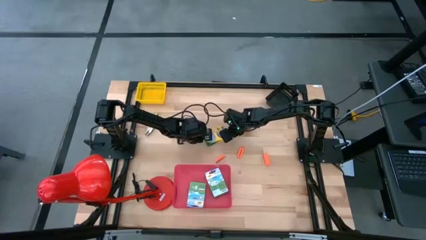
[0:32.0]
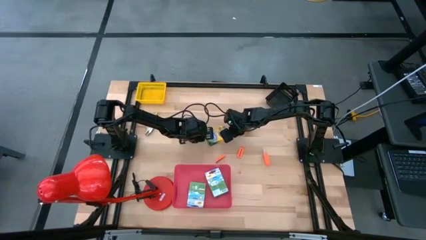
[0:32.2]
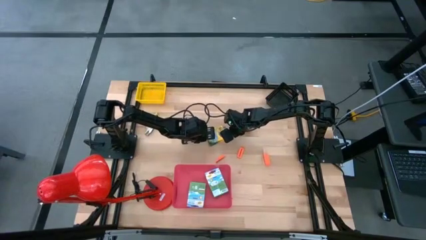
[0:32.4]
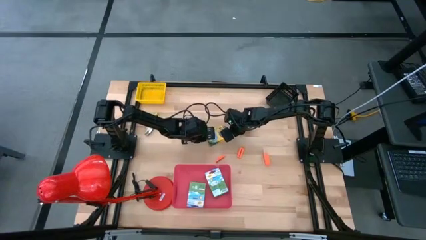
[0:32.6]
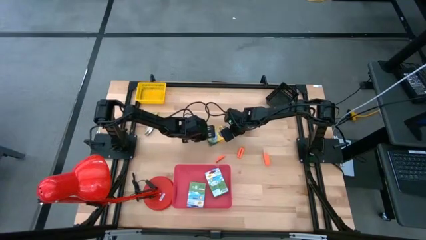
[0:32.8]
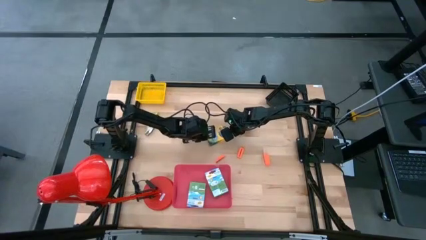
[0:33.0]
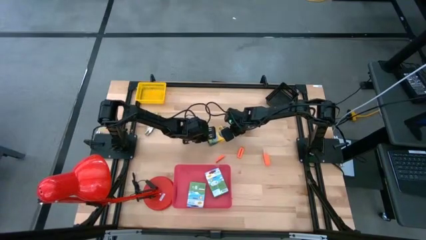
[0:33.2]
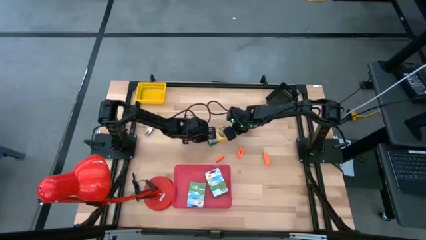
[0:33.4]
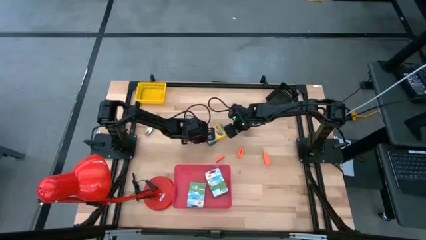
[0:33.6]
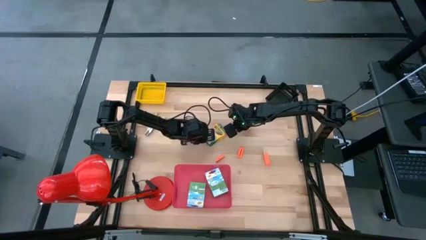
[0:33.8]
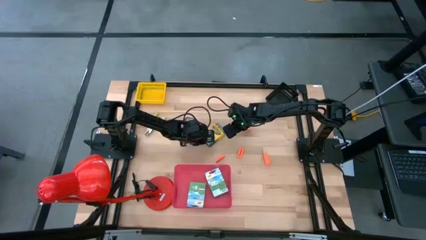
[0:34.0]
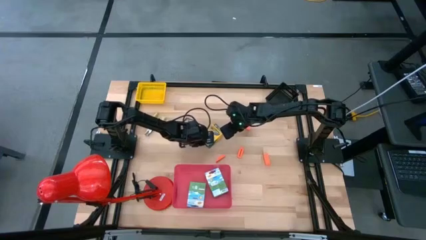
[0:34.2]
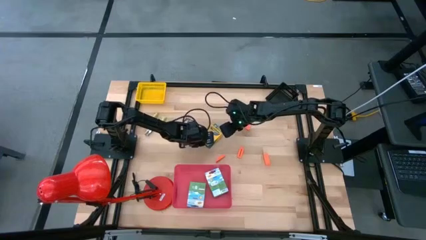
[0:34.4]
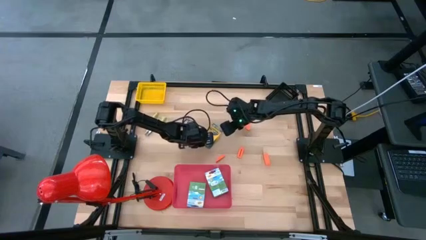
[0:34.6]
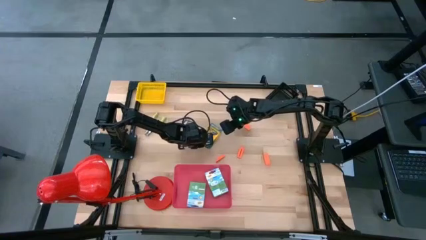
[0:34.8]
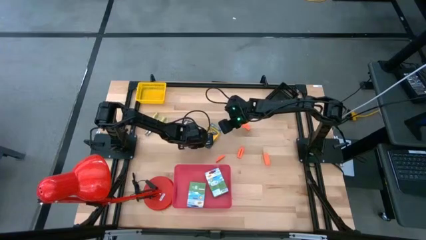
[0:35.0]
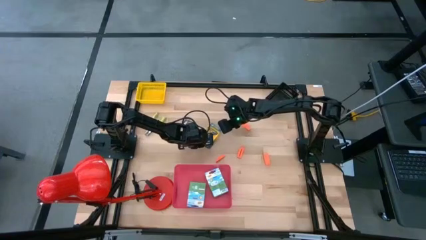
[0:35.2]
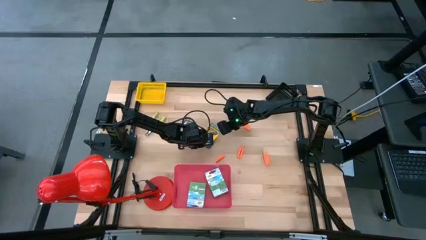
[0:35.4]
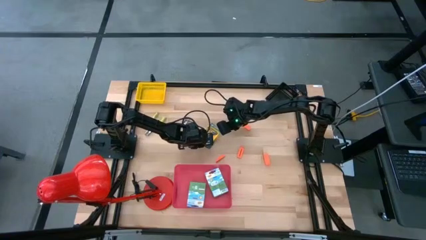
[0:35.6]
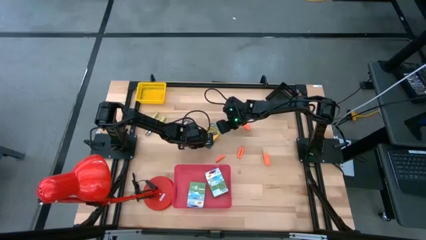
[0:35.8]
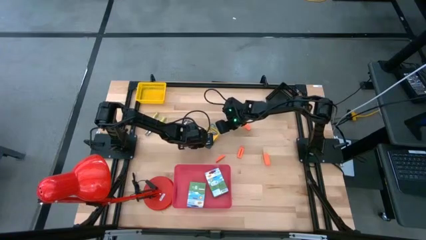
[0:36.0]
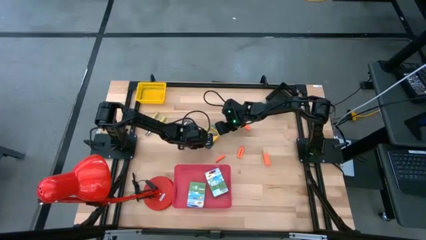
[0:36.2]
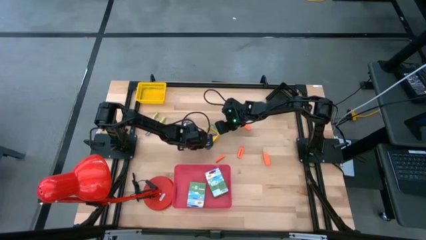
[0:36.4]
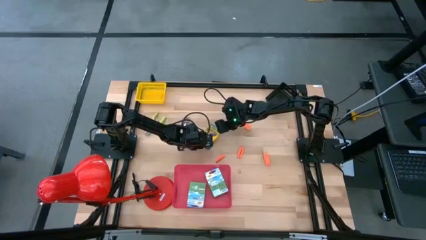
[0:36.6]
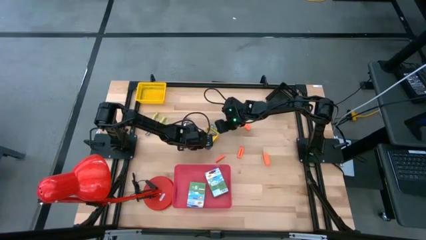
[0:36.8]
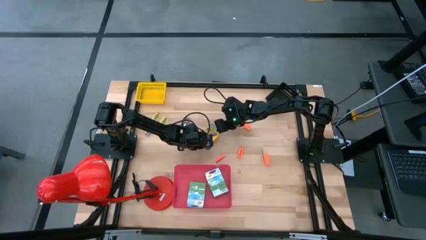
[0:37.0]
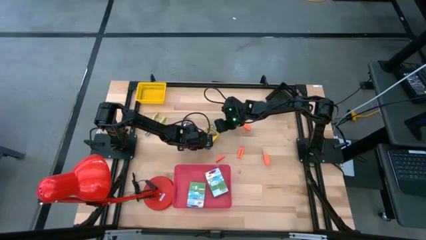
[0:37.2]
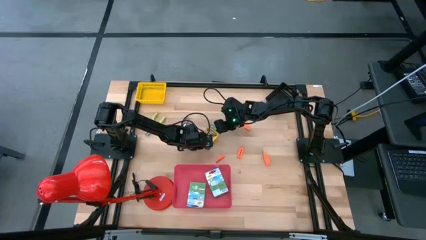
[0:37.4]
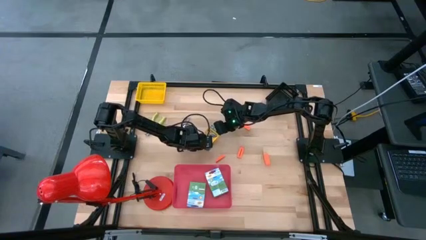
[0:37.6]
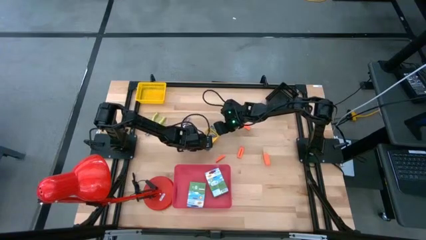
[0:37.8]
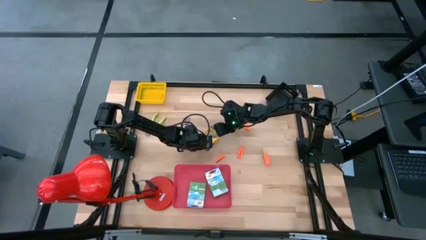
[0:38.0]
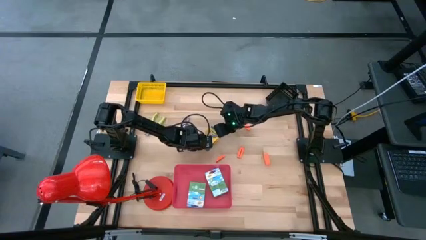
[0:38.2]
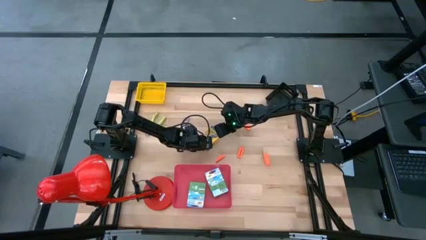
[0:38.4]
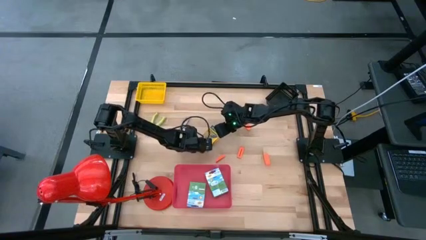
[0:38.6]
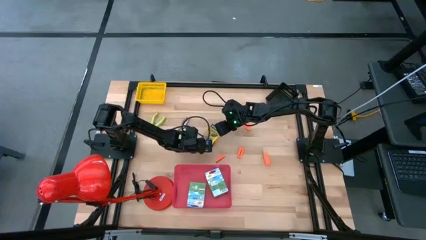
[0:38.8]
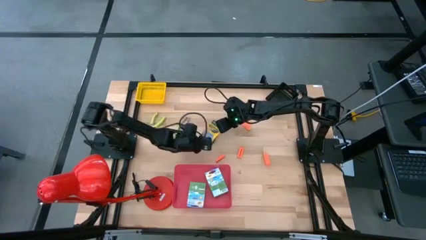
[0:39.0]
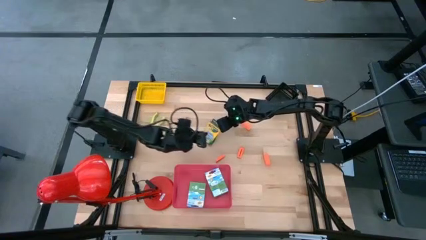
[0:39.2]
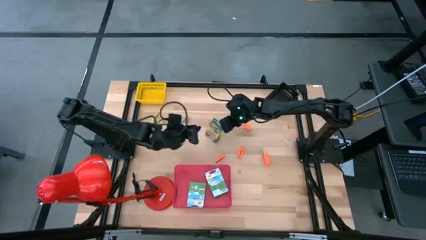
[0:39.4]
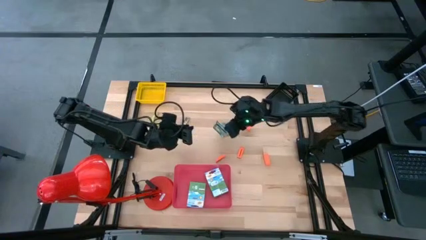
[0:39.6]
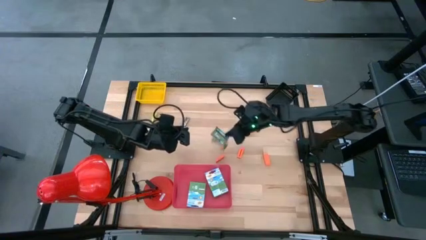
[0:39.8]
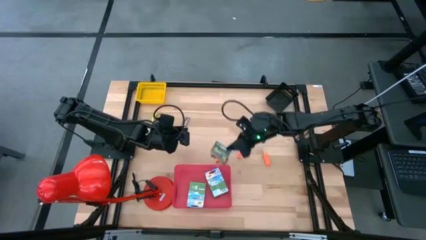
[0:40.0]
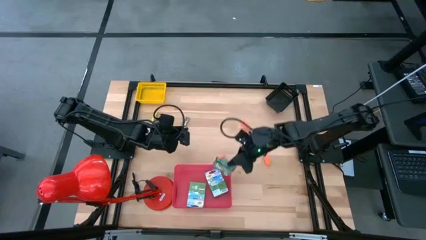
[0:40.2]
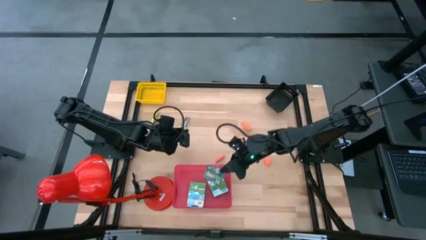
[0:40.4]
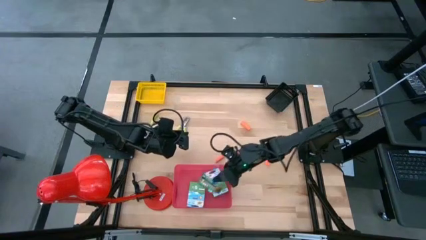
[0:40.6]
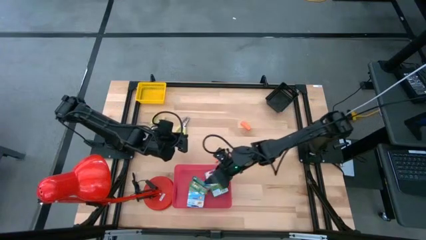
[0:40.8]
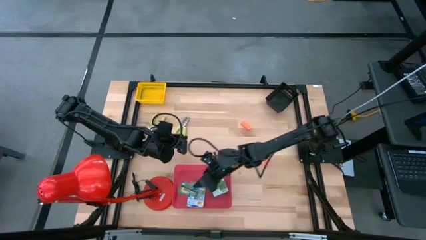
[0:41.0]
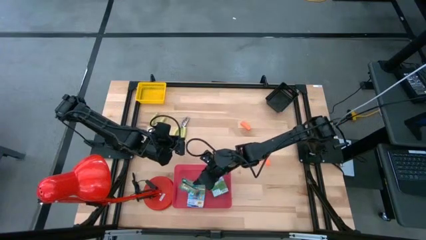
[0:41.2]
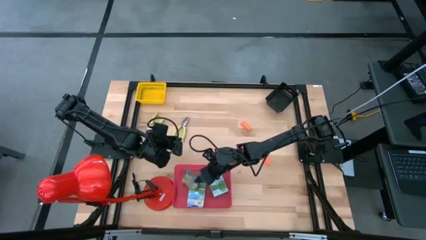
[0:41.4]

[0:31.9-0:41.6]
Task: Pick & Place School Supplies
Put the yellow crayon box into the pink bin

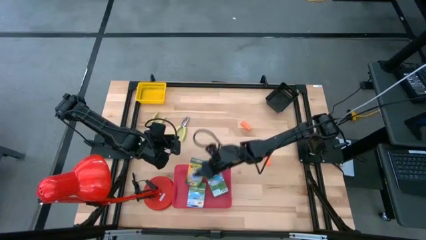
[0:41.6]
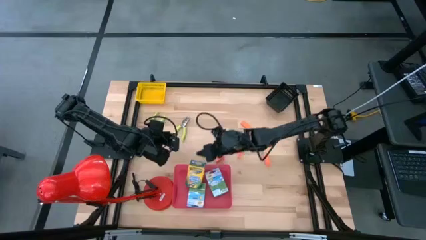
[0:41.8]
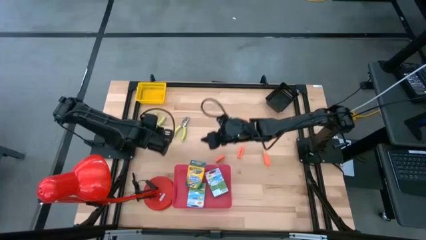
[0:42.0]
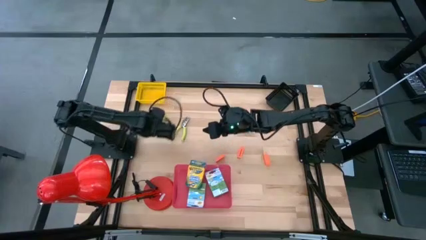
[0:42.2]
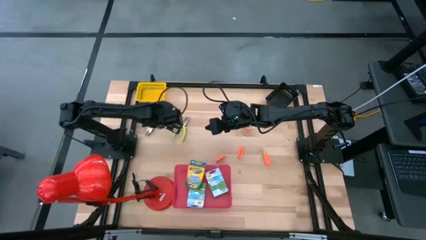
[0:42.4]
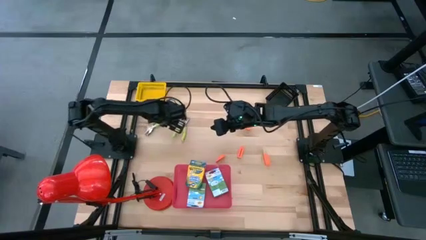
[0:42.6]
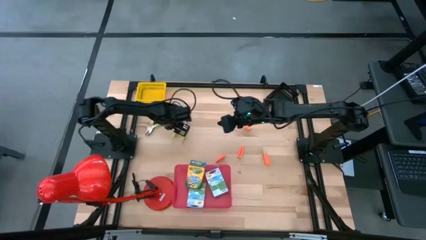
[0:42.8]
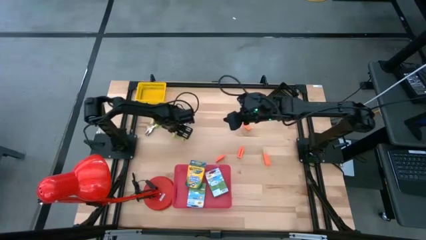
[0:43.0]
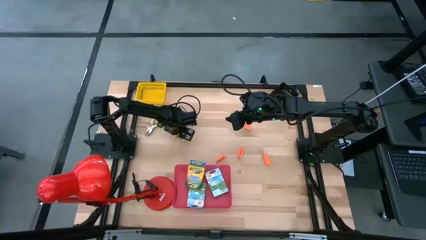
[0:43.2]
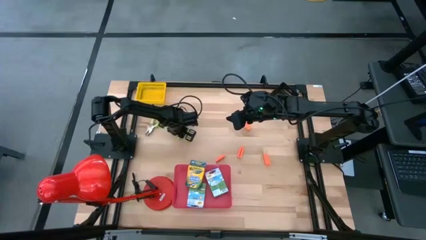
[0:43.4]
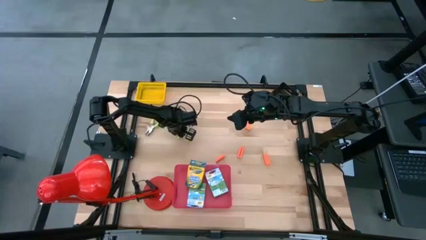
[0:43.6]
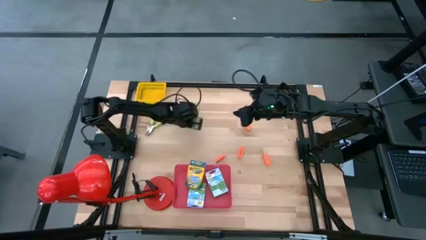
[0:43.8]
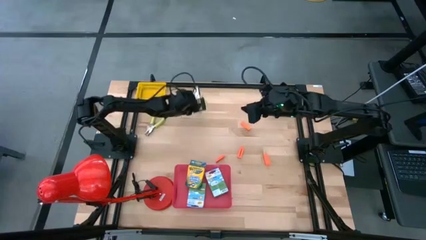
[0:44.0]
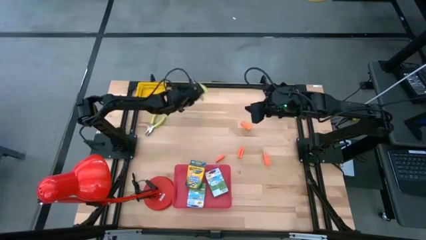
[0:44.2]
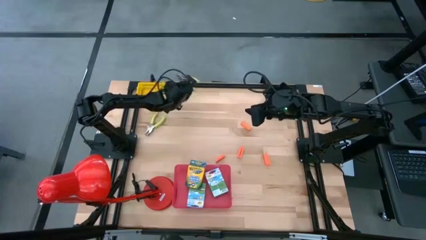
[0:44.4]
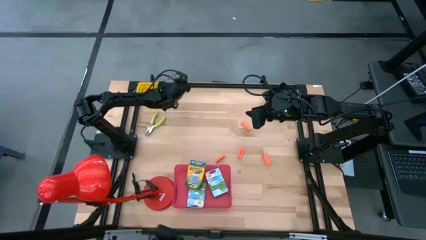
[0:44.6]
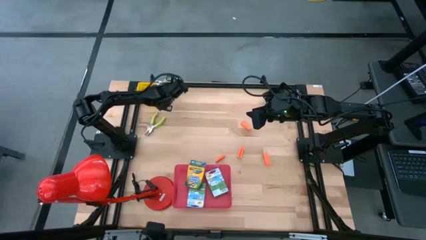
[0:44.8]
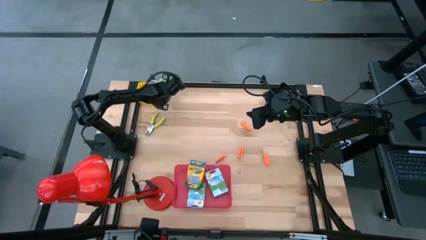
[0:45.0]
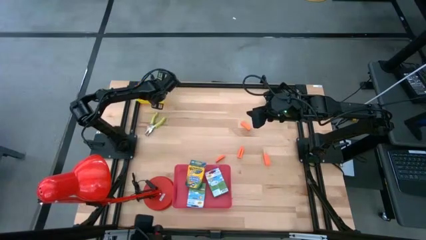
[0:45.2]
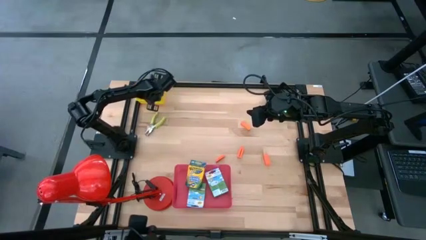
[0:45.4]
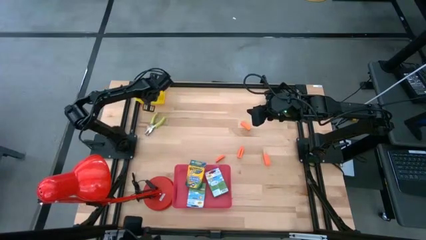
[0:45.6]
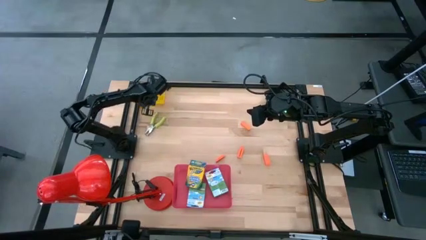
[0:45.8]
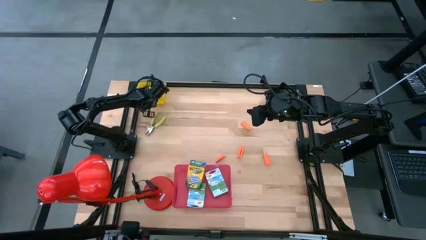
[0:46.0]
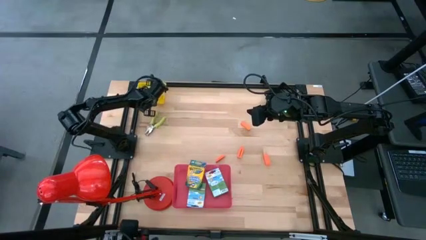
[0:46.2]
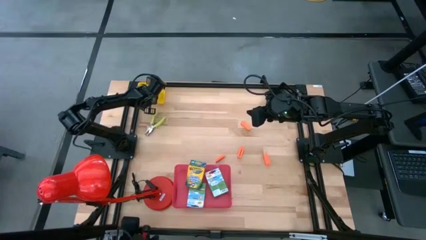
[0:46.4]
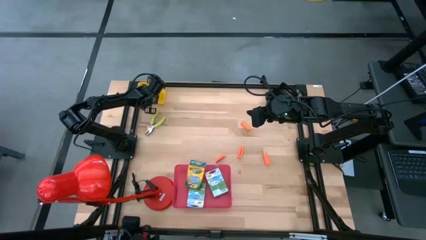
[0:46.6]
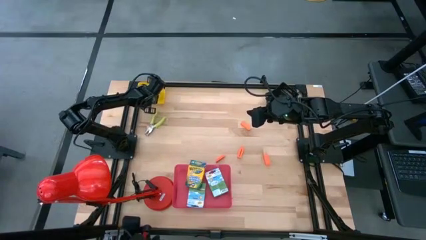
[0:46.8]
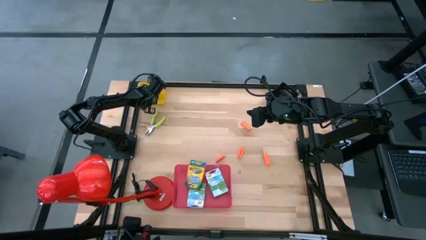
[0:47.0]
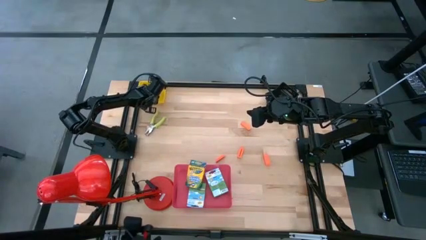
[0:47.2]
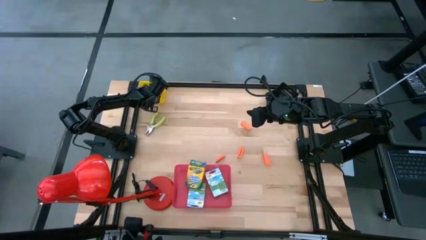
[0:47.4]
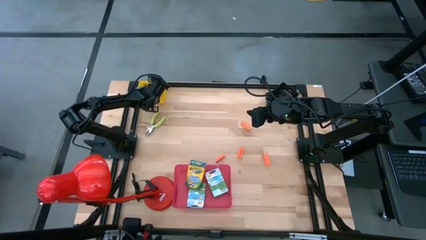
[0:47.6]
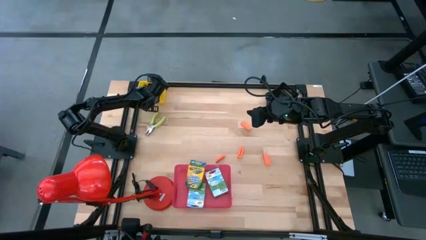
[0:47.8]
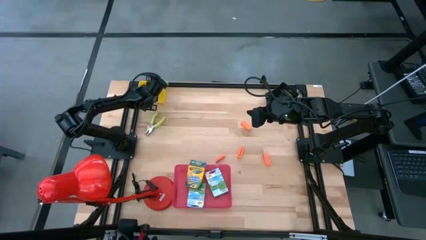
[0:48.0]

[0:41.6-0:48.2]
Put the green puncher into the yellow bin

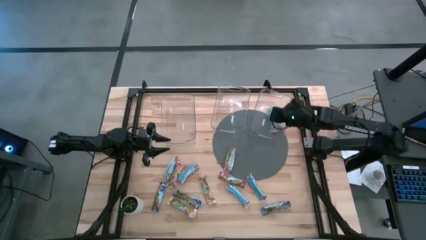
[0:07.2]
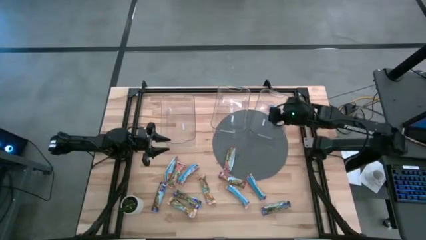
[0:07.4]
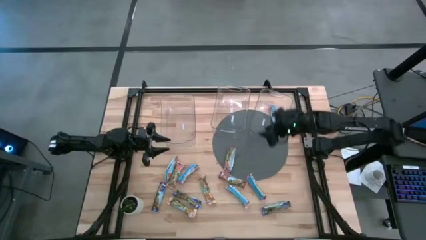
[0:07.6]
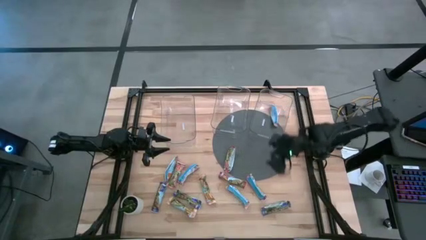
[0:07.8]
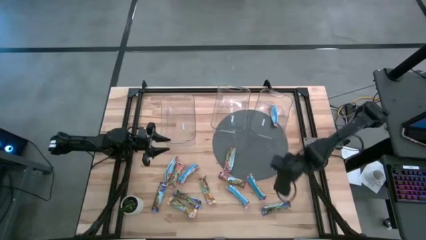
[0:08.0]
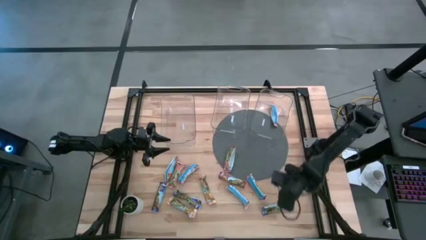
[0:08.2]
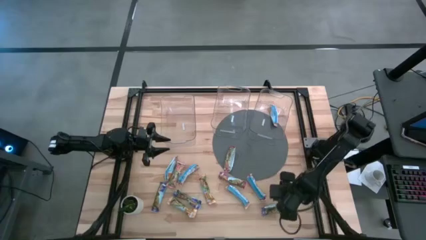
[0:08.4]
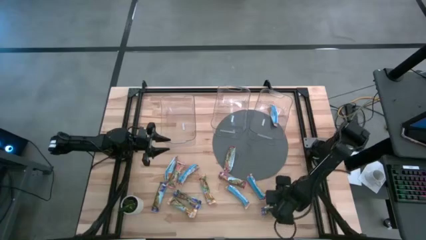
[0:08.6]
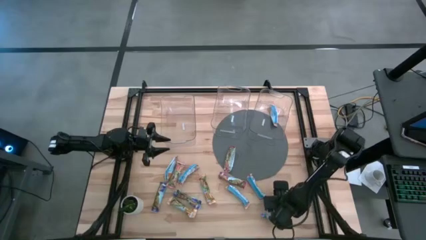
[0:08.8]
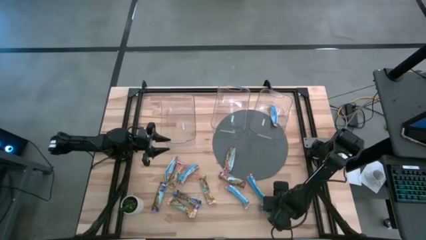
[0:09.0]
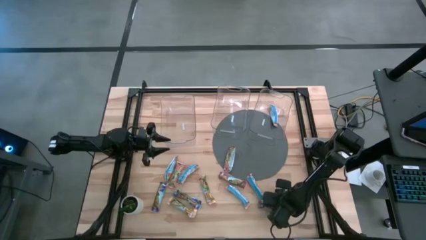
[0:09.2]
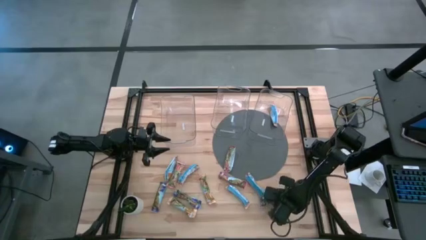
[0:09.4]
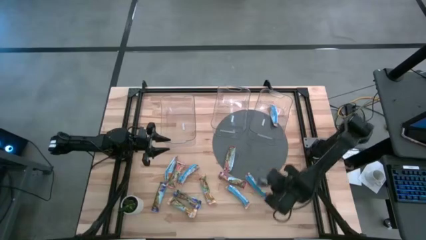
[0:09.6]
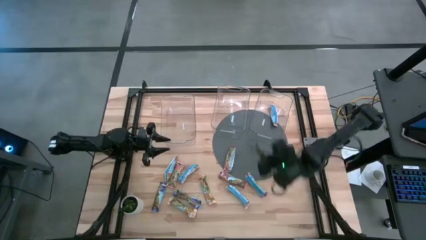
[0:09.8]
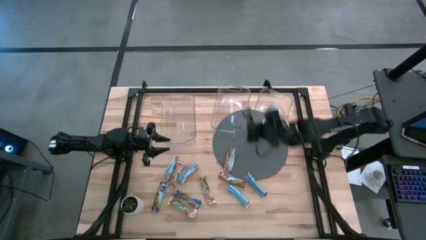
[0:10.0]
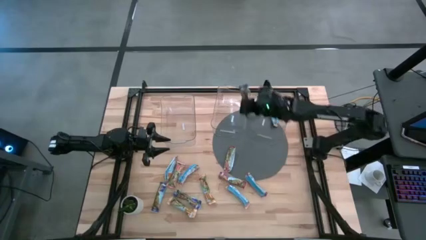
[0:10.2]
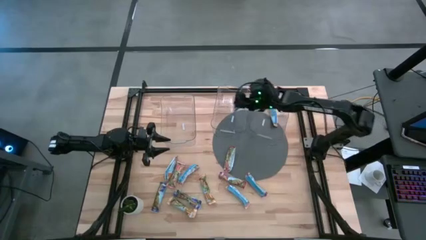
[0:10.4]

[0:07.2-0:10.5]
Task: Pick and place Granola Bars by type
Put the blue granola bar into the middle transparent bin
